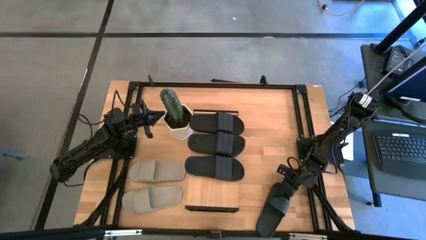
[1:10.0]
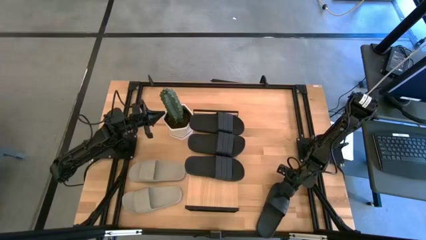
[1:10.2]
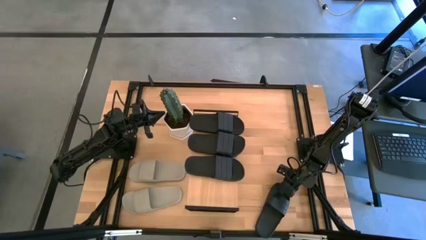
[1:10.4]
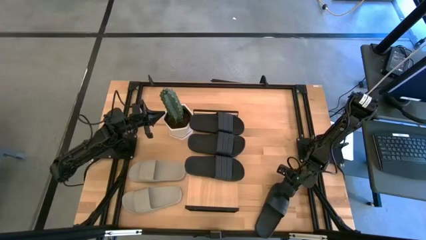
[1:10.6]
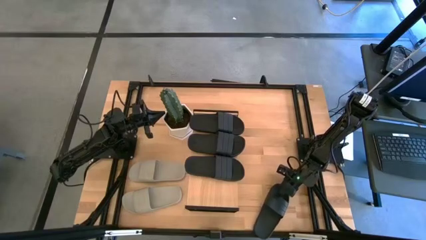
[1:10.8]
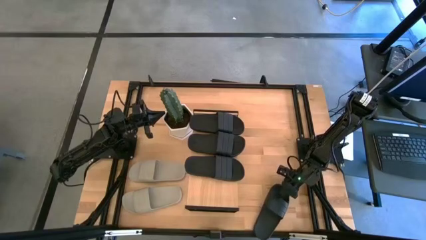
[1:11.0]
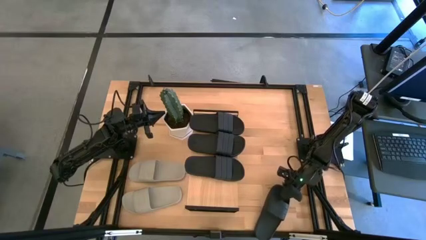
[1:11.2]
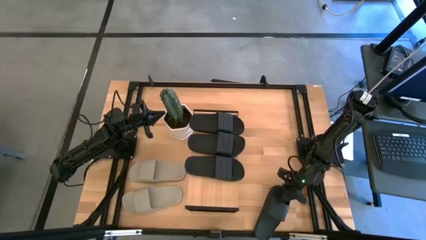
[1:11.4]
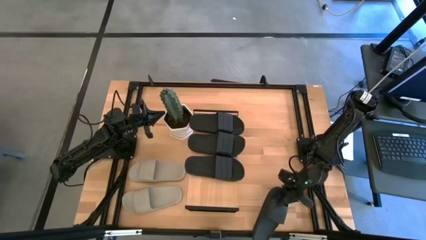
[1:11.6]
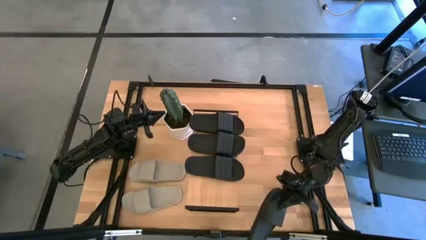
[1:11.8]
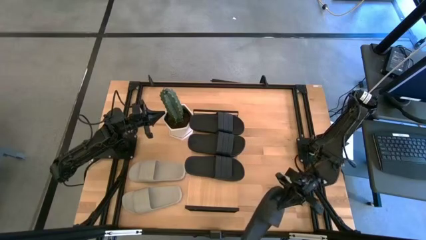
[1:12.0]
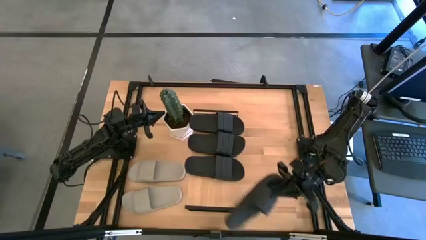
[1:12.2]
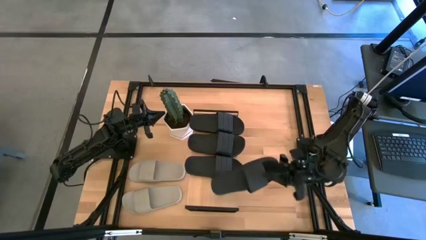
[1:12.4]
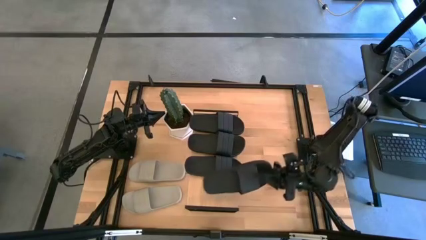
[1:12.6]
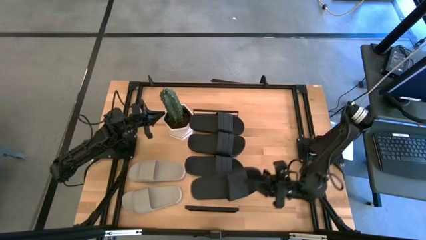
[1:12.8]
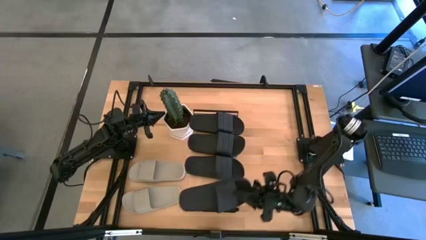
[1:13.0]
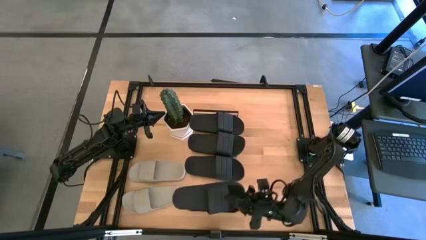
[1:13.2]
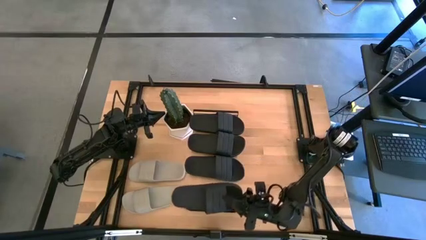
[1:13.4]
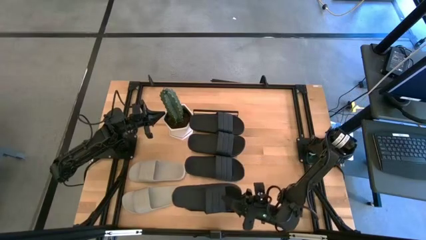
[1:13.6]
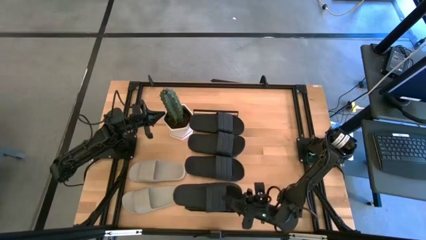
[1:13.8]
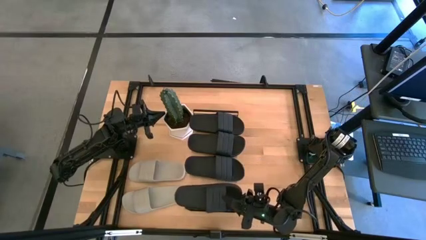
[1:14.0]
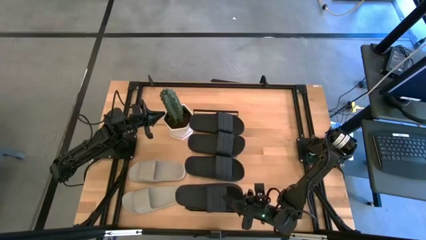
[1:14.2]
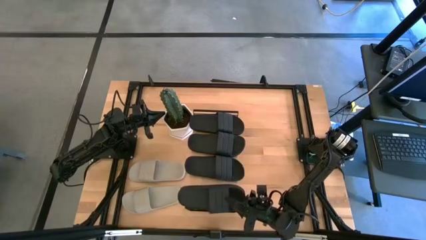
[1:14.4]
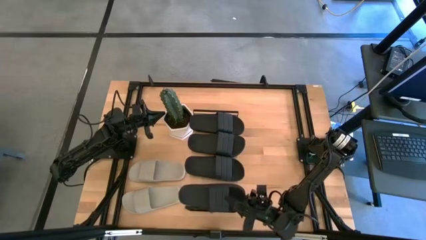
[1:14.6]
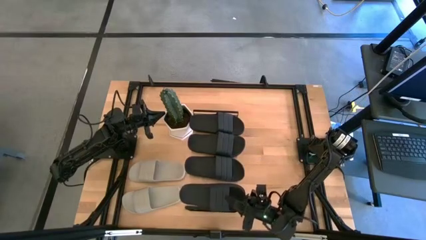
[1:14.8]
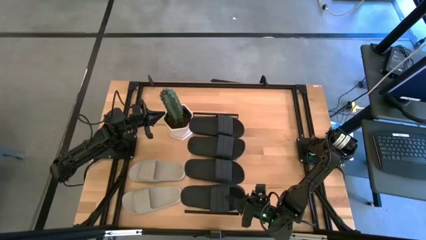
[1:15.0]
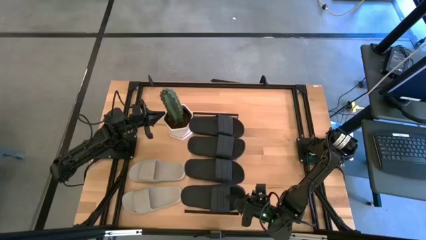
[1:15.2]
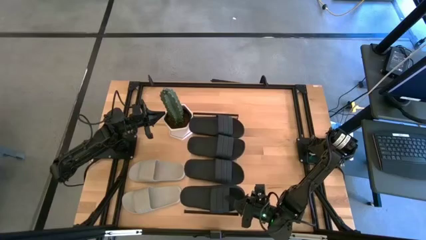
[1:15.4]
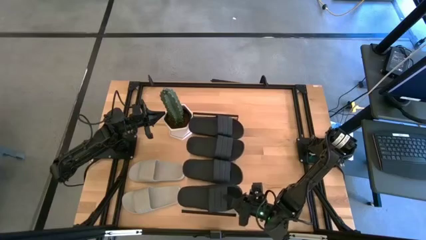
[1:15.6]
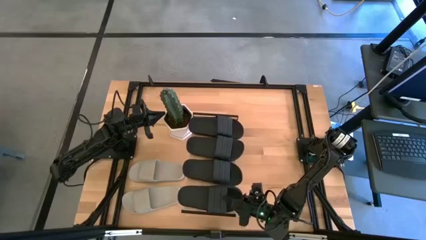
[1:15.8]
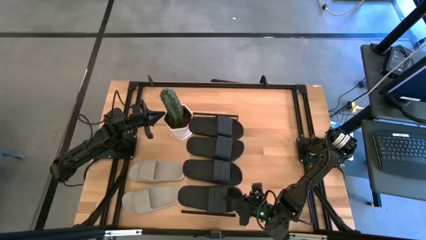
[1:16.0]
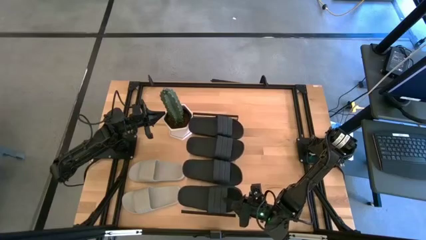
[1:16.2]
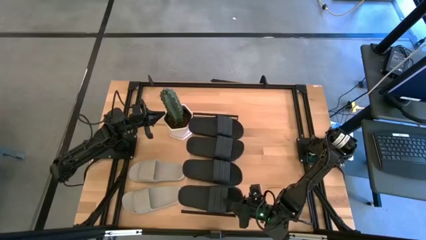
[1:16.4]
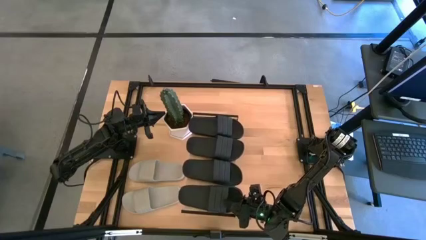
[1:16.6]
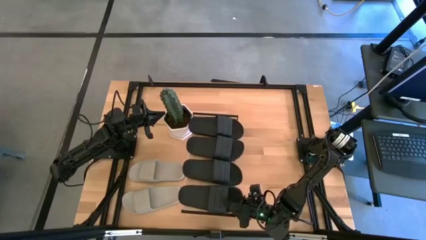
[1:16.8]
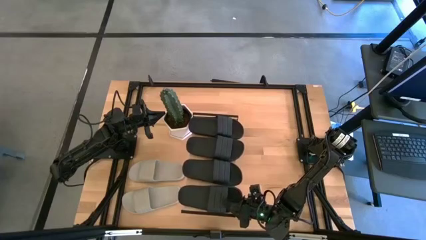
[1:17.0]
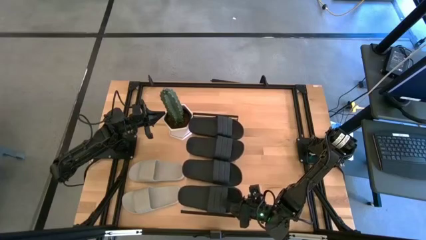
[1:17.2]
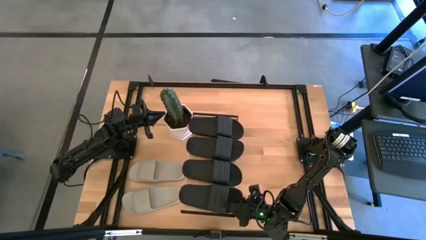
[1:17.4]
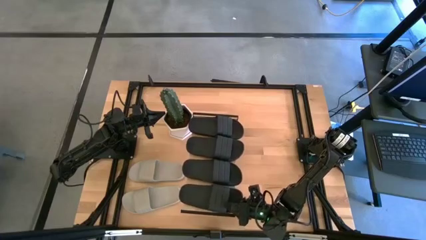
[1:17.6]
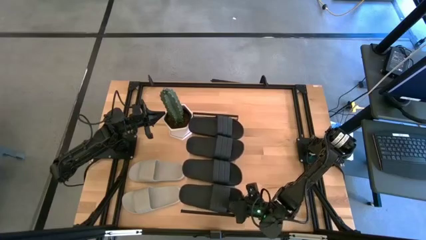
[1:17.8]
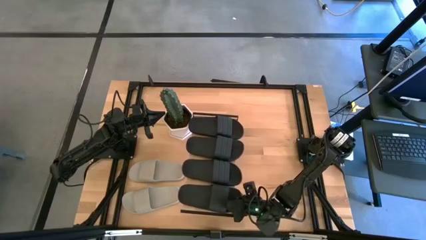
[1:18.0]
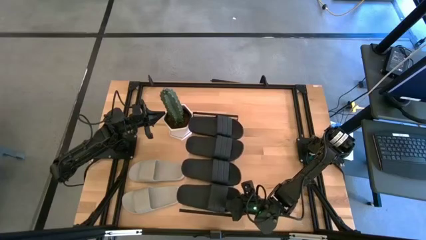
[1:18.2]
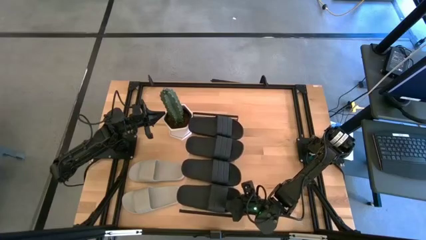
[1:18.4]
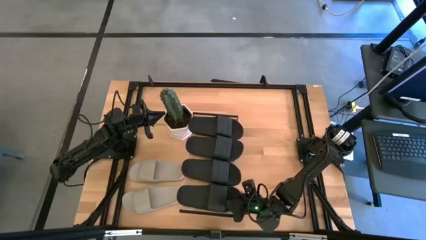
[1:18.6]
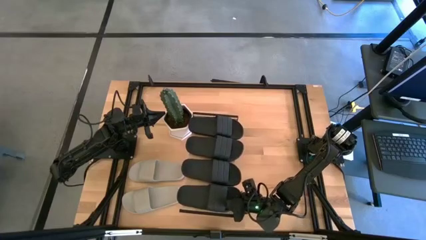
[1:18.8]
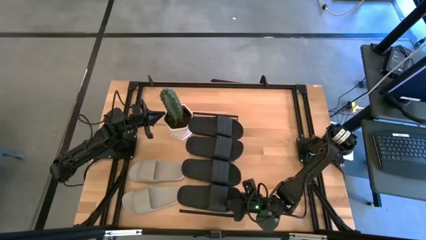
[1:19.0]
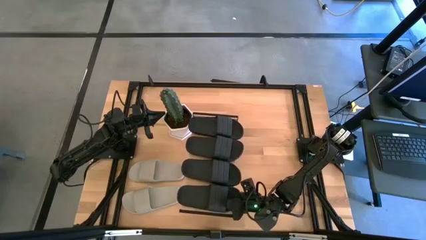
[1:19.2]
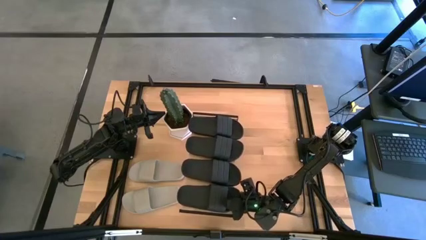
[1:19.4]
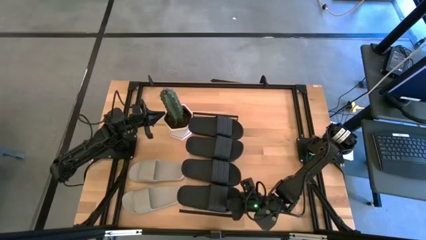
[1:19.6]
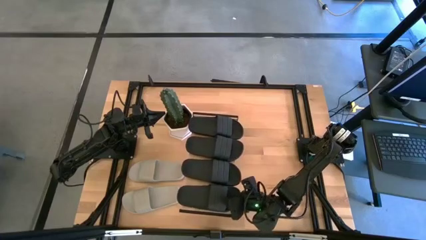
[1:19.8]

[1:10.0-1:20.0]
Task: Pick and place slides into the shelf
Put the black slide on the shelf

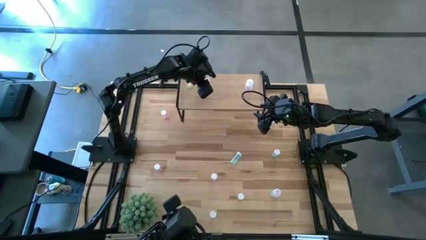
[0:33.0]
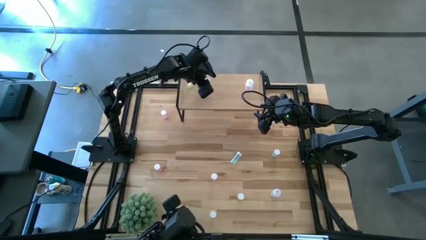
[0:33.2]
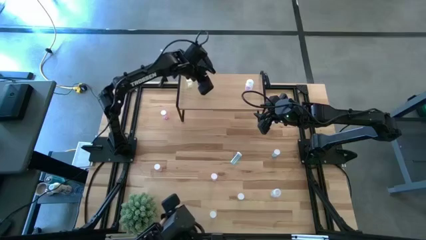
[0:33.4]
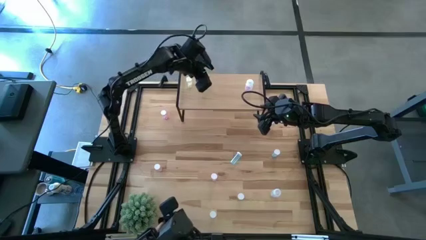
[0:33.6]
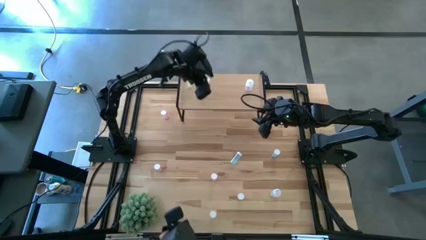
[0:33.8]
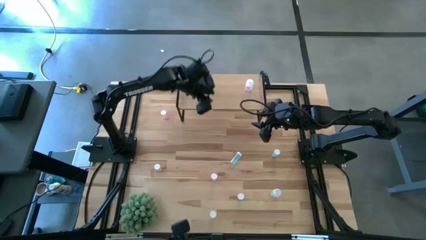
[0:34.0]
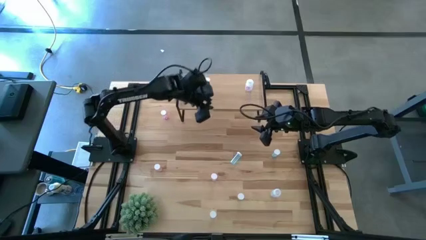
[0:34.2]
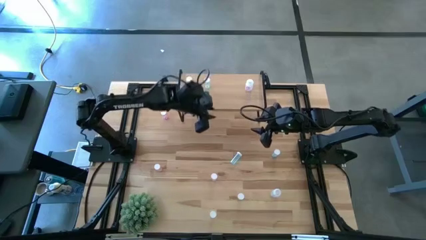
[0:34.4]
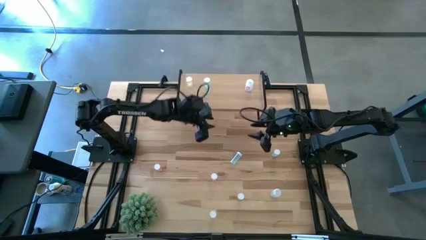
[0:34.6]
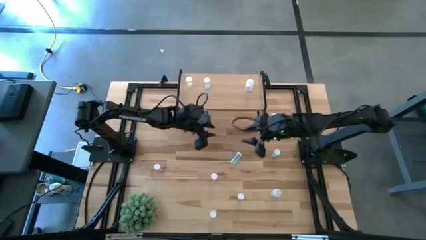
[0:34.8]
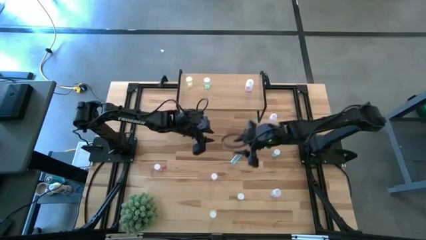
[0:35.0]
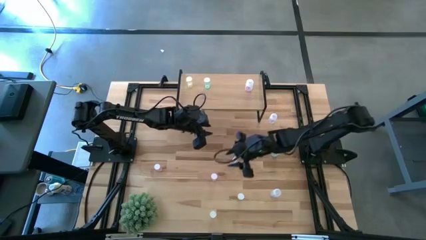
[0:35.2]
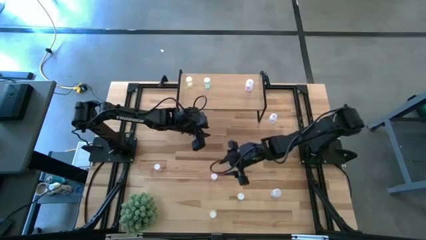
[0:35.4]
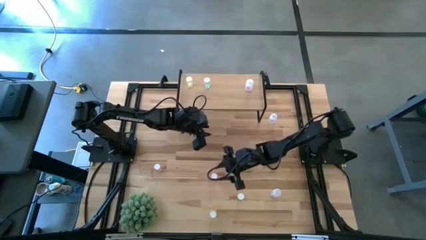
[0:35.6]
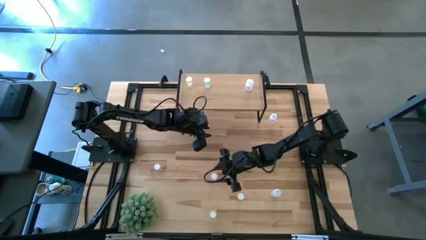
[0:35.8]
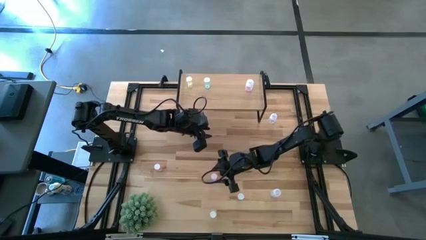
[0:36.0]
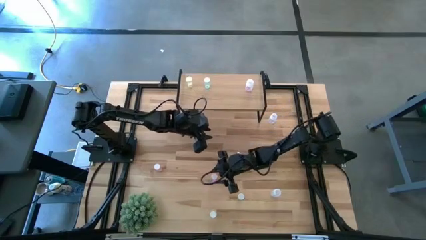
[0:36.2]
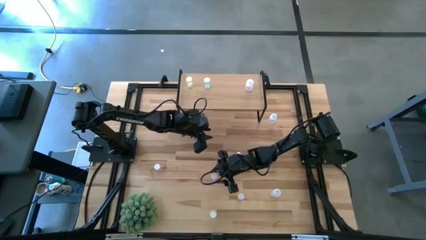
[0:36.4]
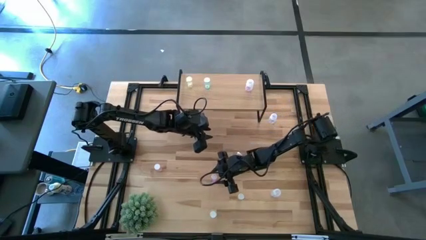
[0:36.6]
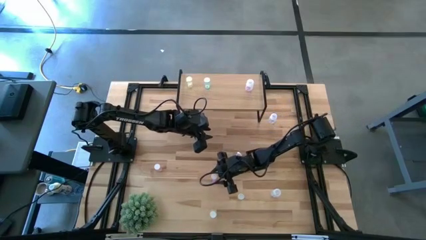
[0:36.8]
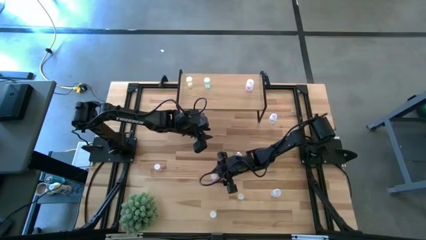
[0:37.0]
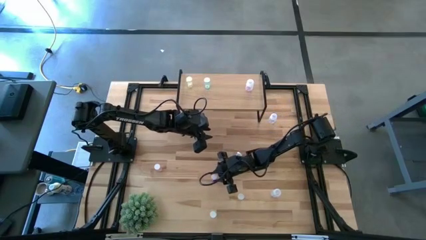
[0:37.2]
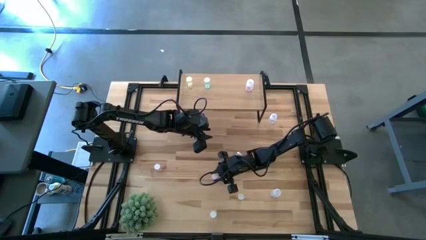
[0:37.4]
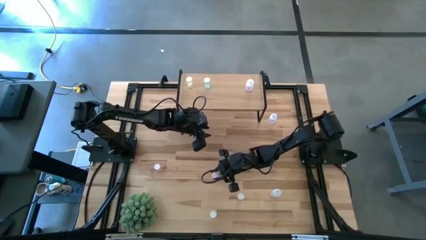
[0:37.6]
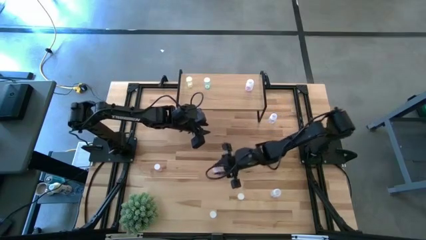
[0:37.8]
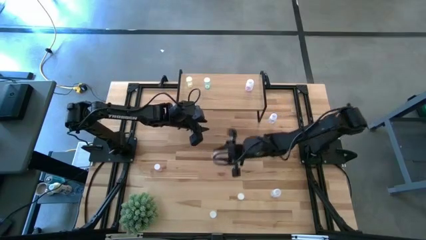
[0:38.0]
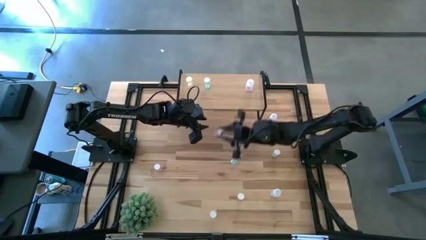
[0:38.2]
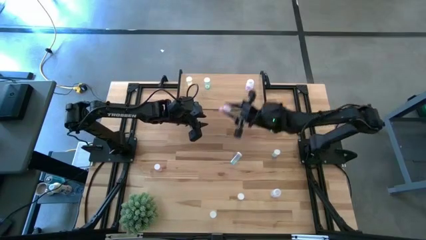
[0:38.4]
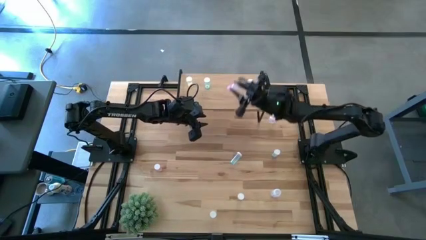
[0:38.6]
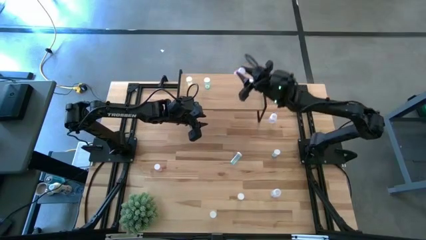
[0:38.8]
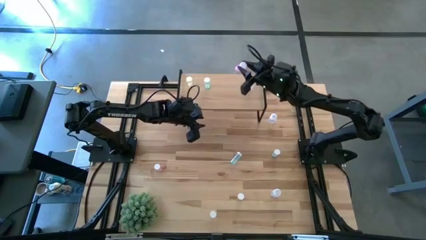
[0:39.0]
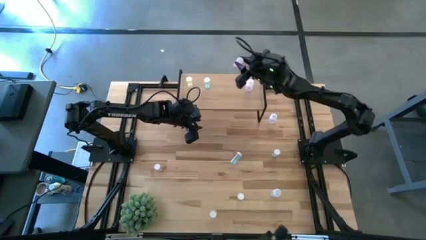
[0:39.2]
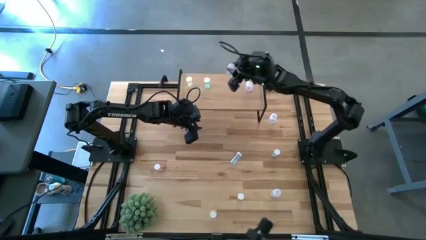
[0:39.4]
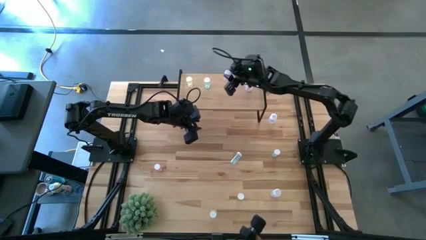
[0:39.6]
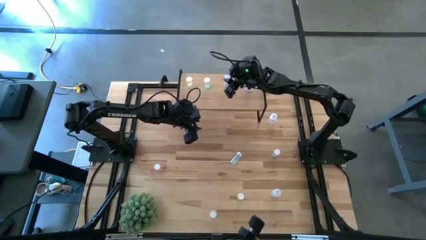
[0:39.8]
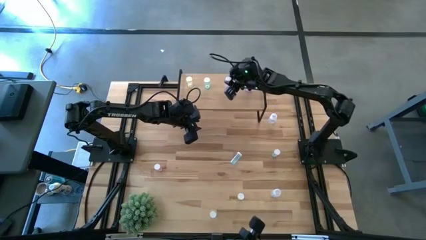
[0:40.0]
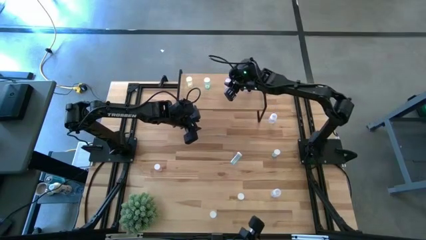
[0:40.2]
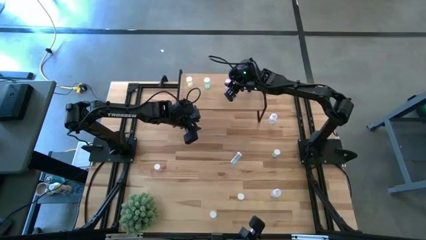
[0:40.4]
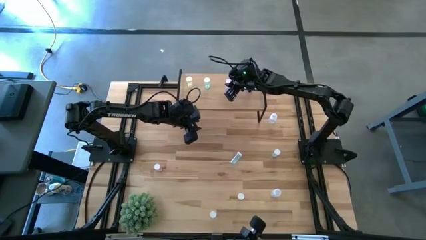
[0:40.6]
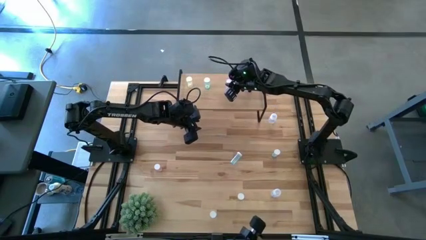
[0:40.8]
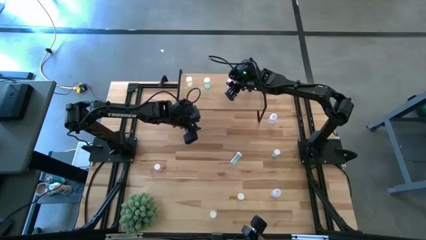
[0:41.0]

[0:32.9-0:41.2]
Task: Pick and place medicine bottles onto shelf by color
Put the bottom pink pill bottle on the shelf
